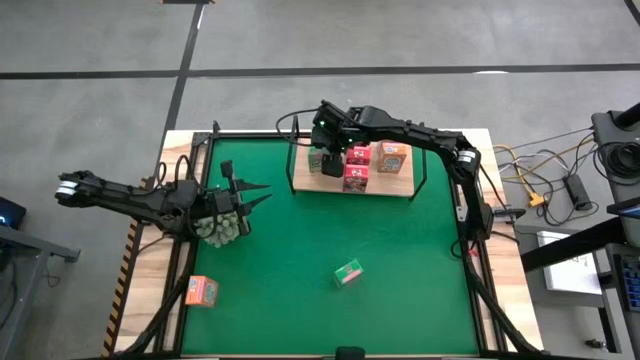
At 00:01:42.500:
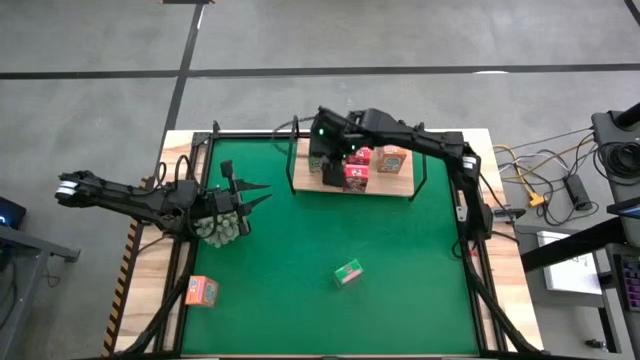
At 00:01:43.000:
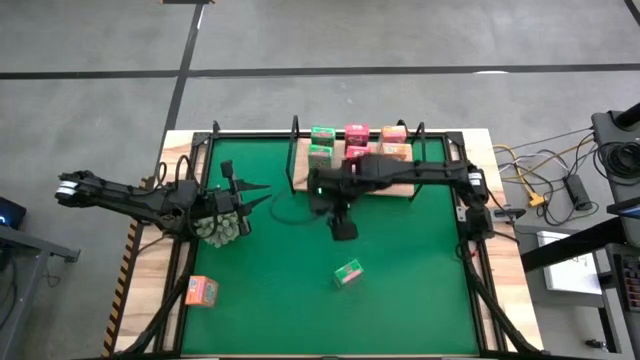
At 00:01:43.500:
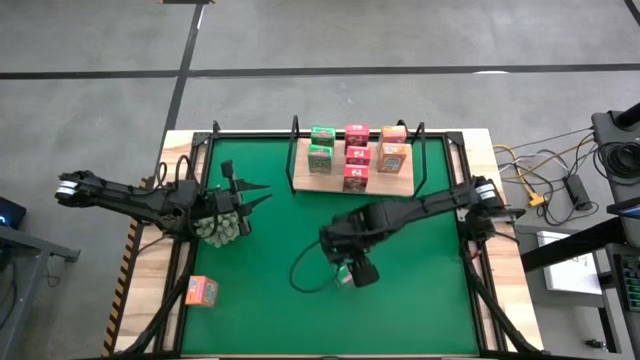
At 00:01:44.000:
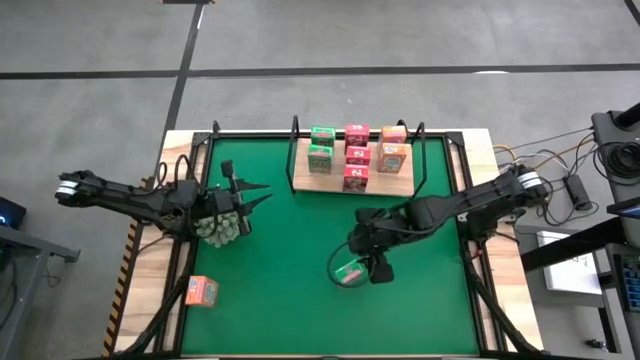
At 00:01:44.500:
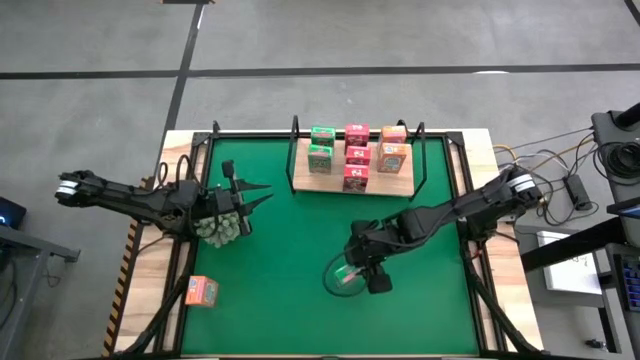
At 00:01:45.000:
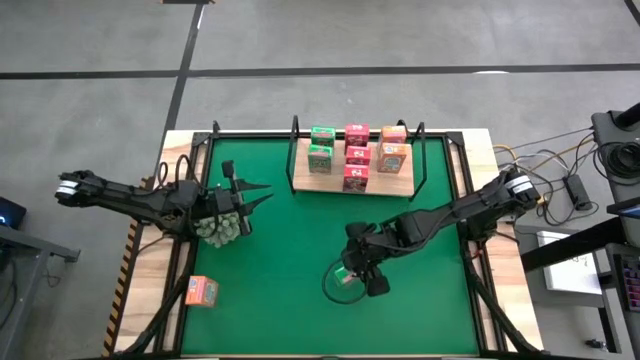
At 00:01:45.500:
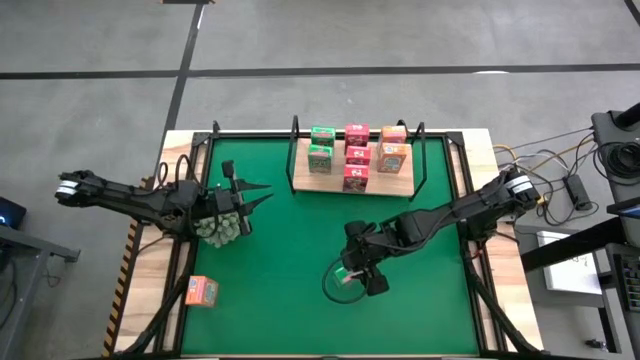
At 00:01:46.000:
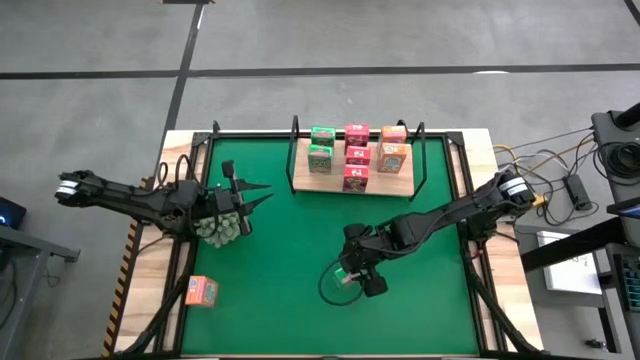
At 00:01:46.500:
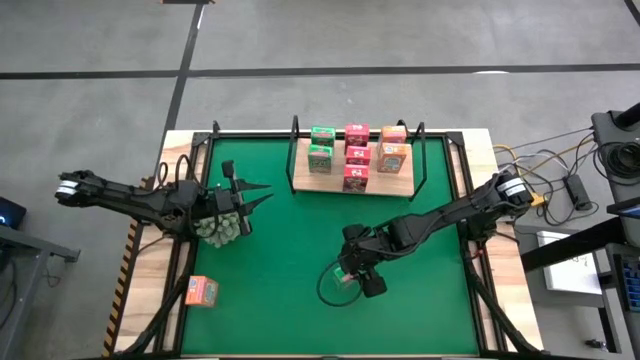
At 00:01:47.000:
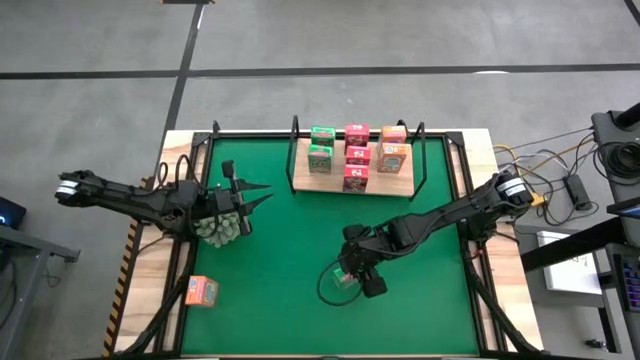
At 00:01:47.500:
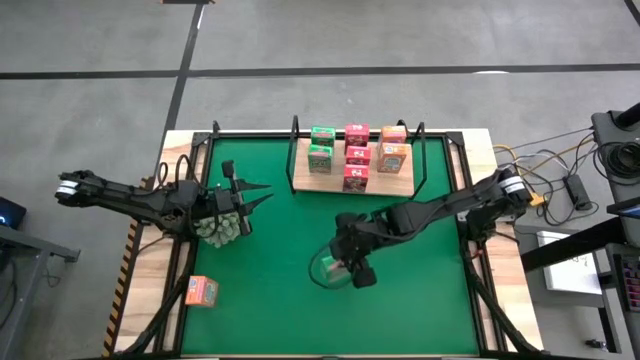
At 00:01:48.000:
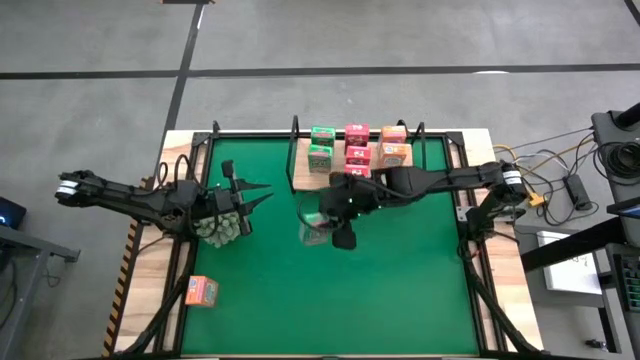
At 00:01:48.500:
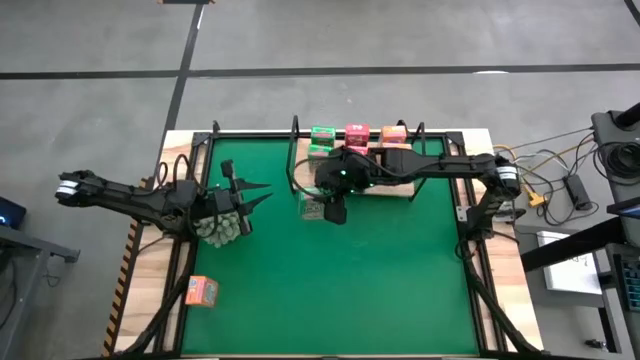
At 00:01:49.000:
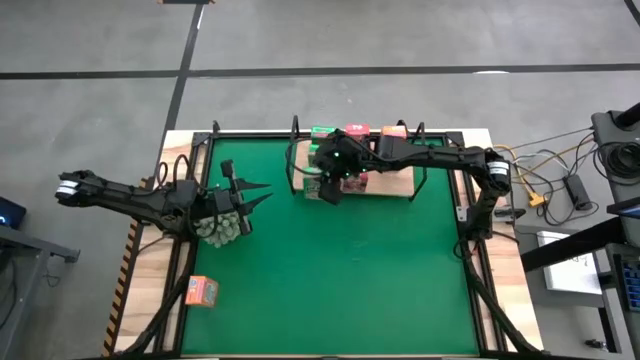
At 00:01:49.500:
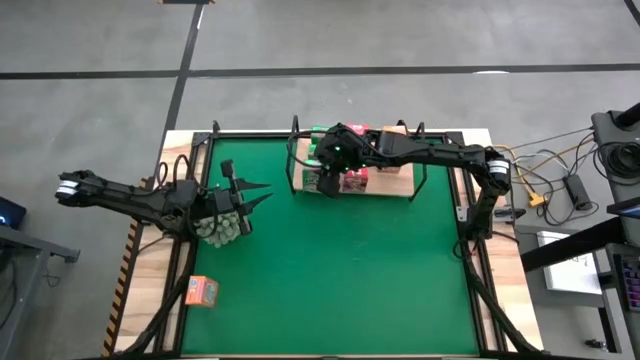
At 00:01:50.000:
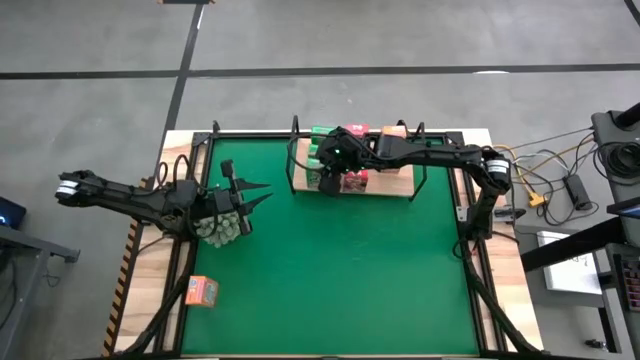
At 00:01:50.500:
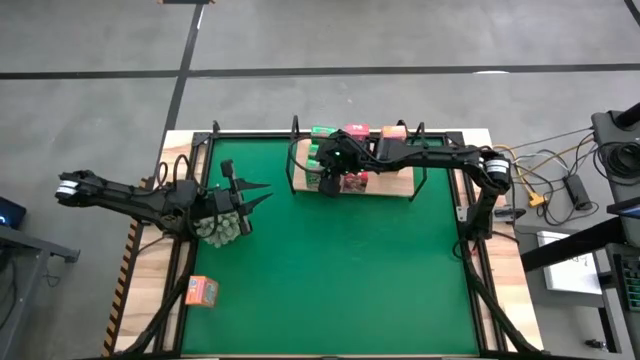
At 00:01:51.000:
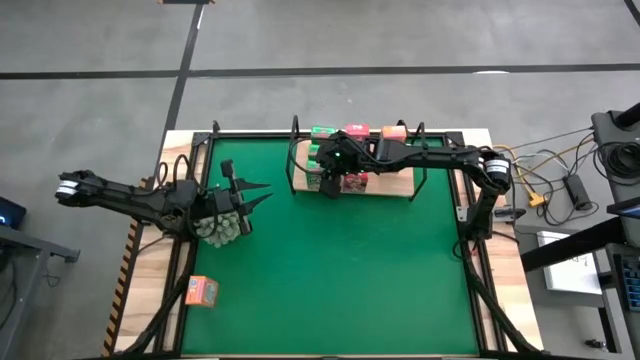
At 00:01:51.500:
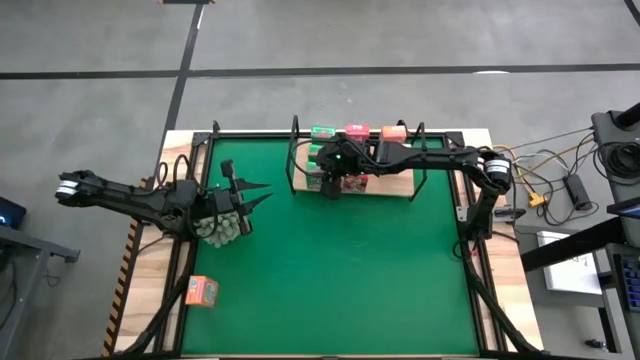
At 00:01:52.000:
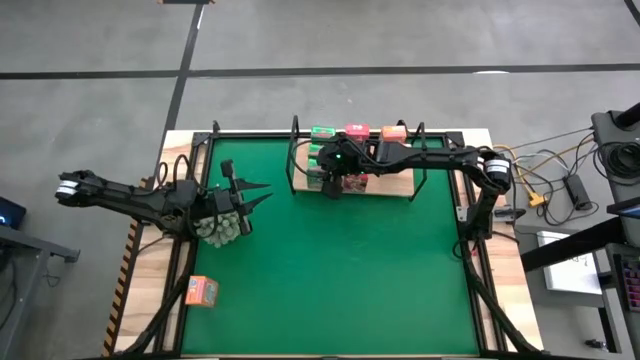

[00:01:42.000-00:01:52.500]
Task: Stack cereal on shelf
Put the green cereal box on the shelf aligned with the other green cereal boxes

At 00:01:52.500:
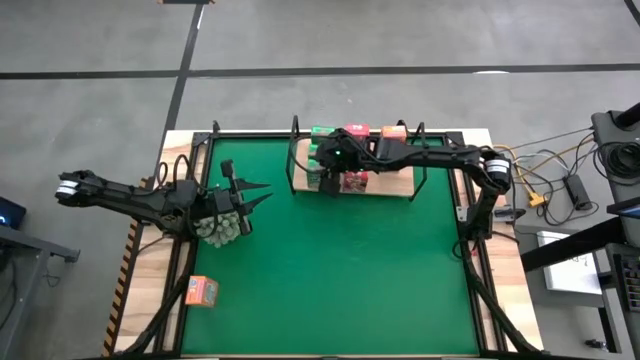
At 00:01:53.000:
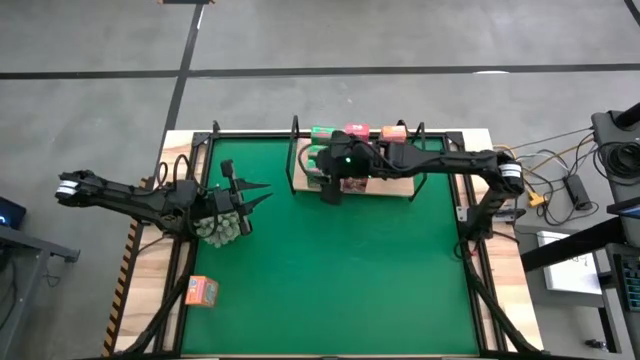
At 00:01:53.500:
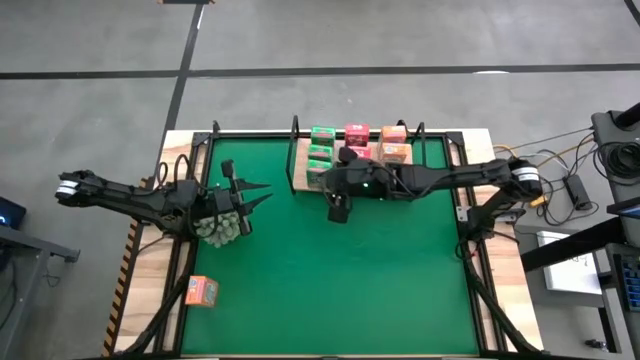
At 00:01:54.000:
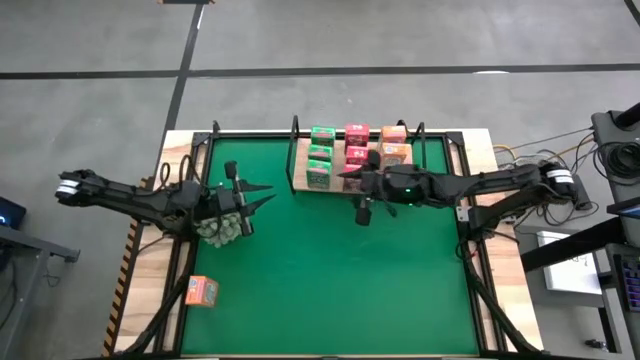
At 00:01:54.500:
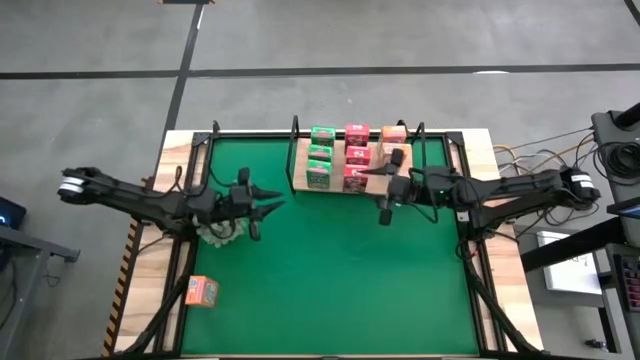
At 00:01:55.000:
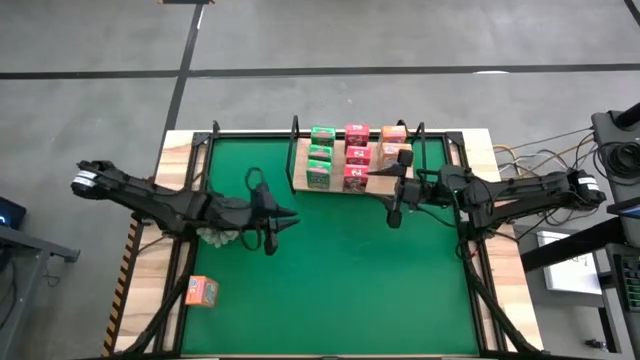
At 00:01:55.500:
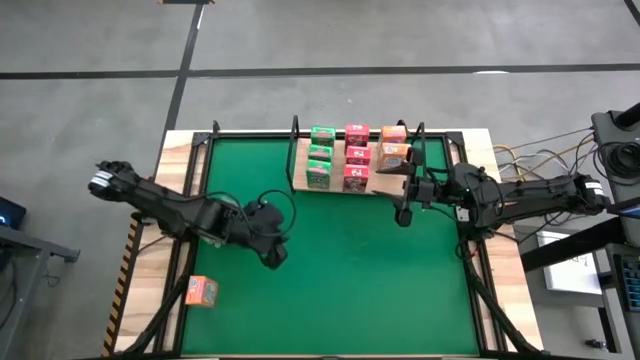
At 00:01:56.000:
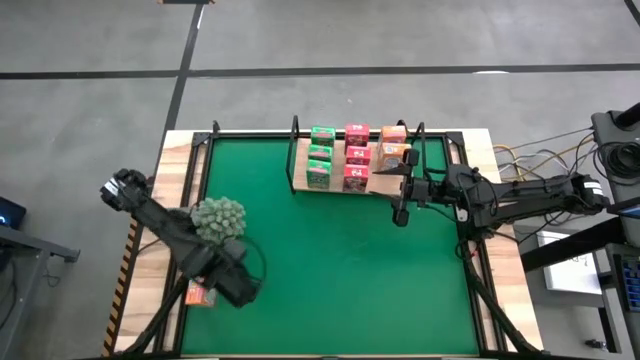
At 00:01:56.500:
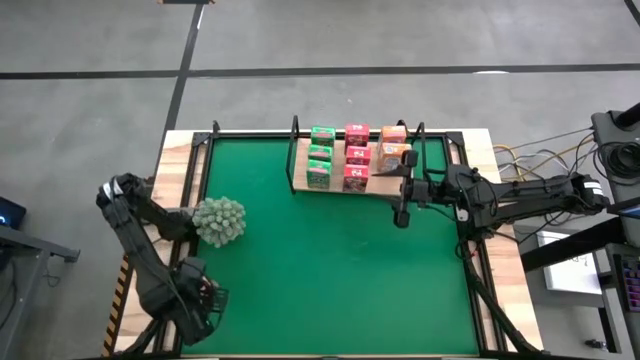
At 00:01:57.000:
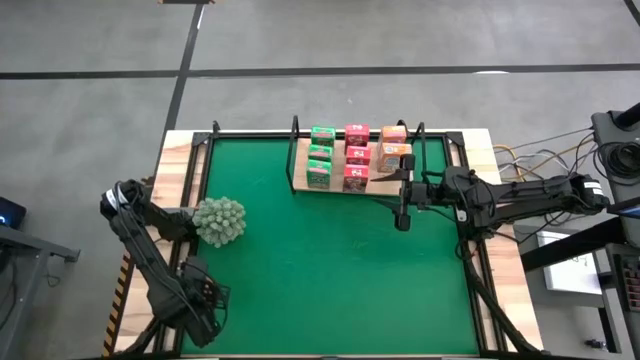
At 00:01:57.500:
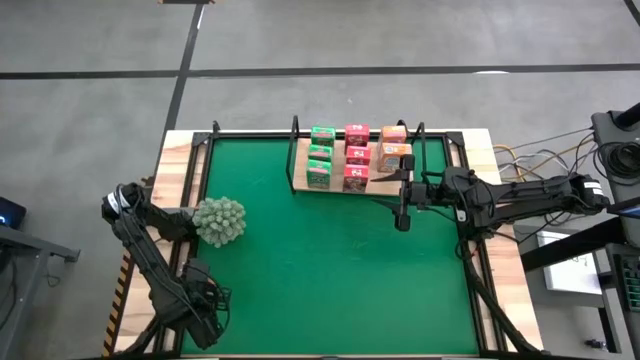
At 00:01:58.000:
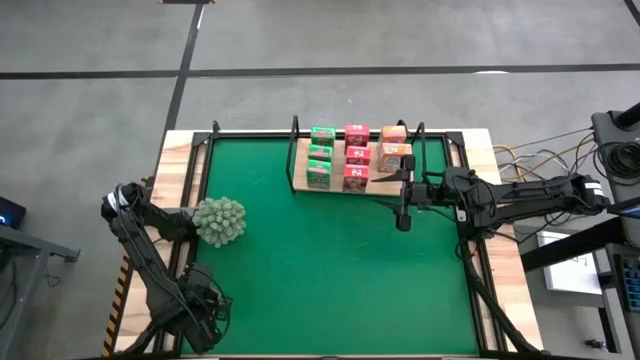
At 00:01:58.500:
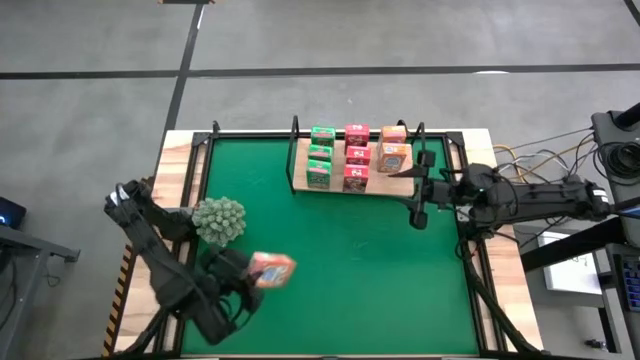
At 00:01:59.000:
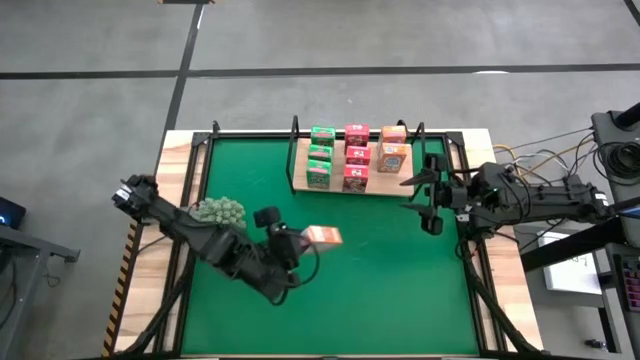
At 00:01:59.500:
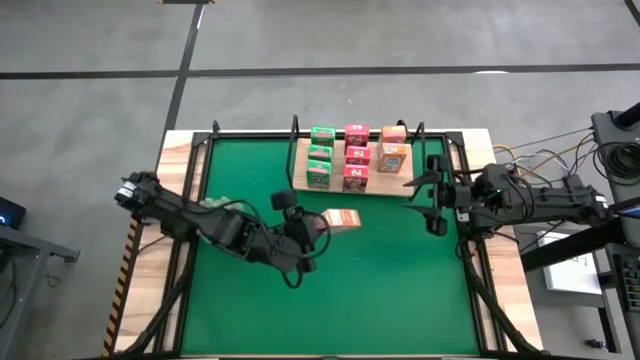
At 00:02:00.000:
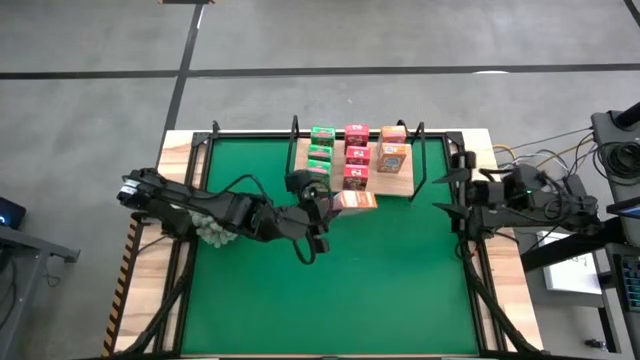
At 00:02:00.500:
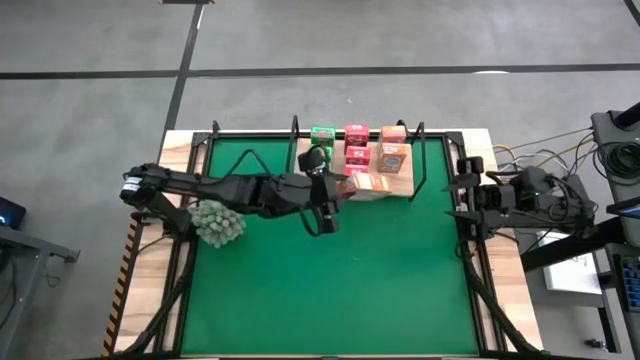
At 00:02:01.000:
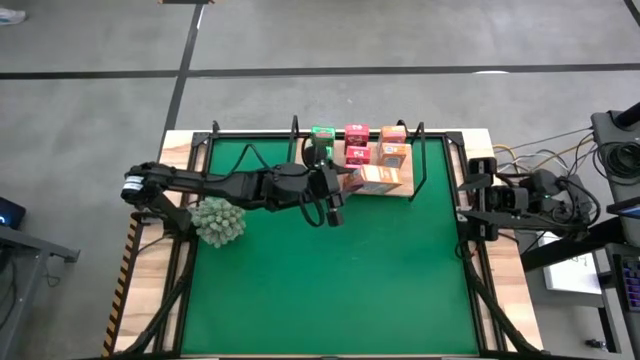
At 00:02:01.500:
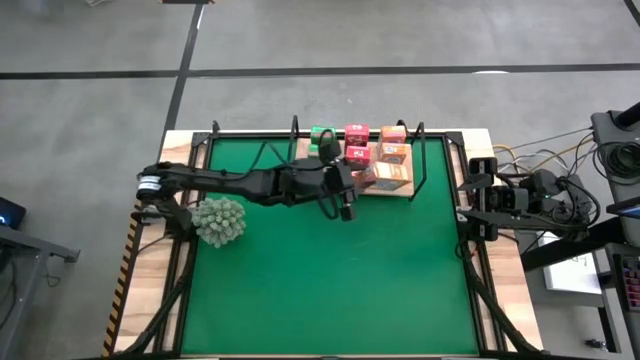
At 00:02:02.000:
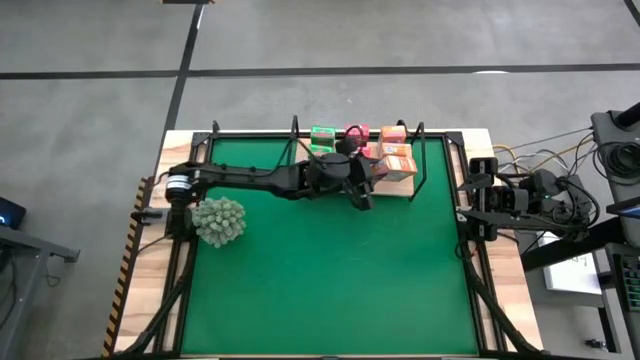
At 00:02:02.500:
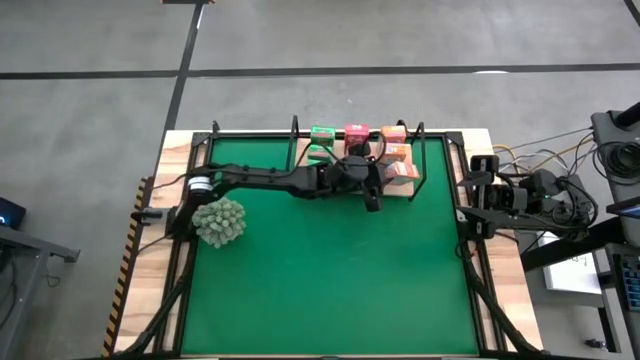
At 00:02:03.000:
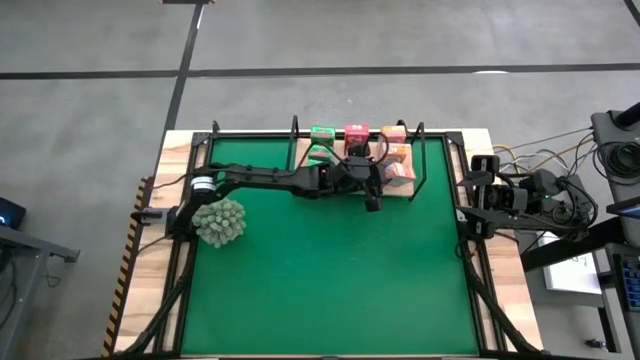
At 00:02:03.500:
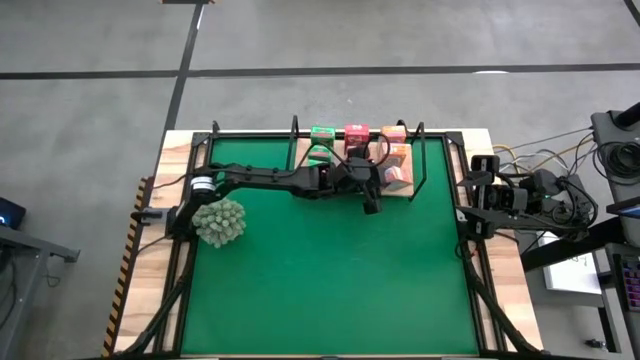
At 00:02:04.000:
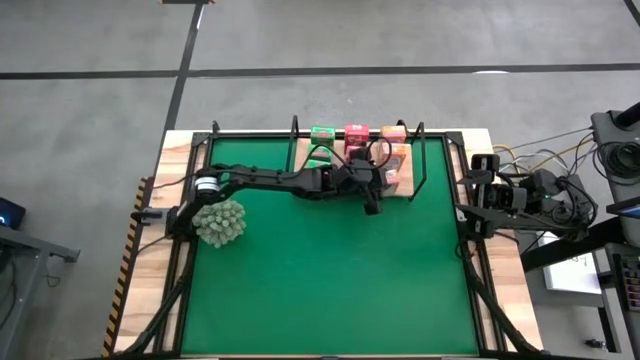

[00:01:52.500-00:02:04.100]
Put the orange cereal box on the shelf aligned with the other orange cereal boxes
